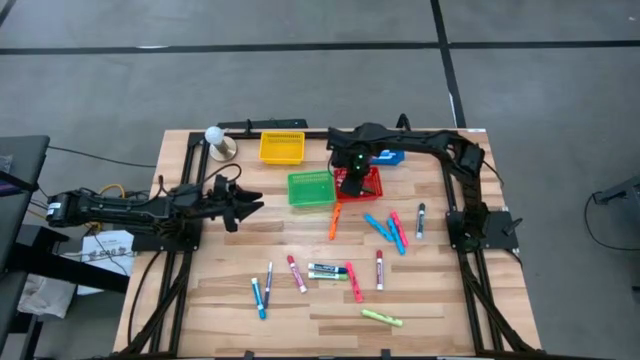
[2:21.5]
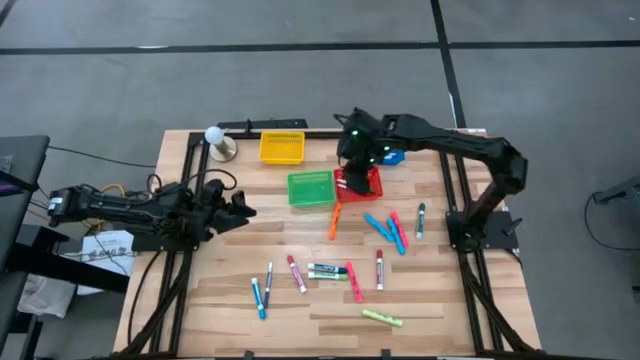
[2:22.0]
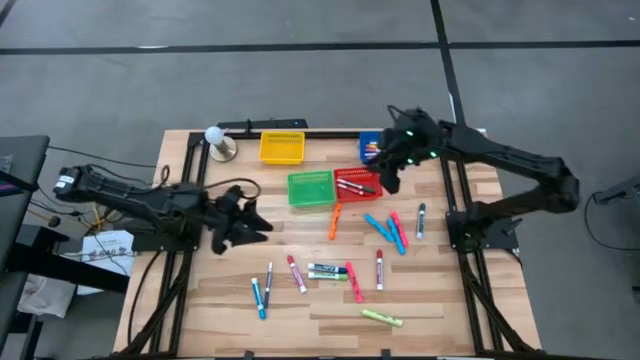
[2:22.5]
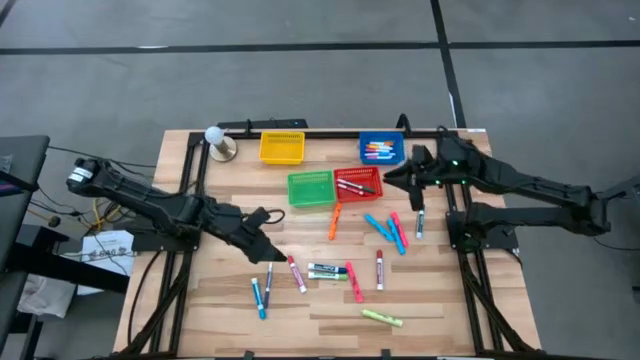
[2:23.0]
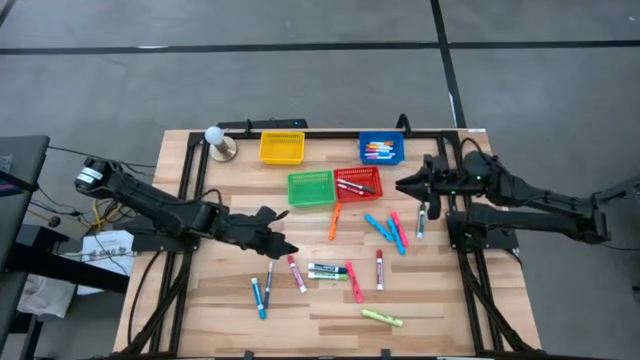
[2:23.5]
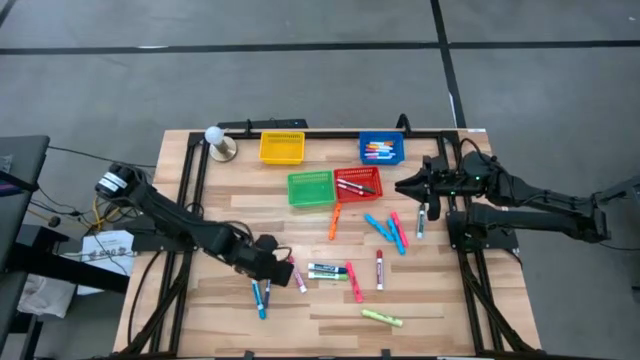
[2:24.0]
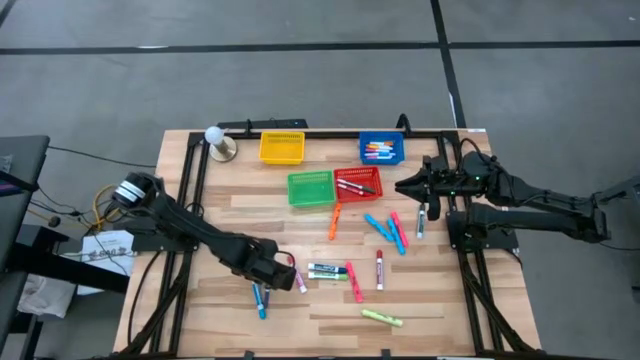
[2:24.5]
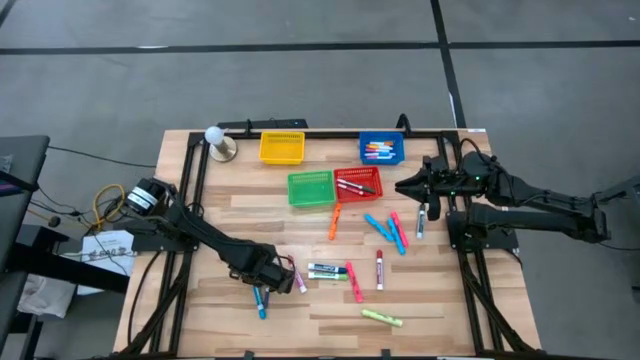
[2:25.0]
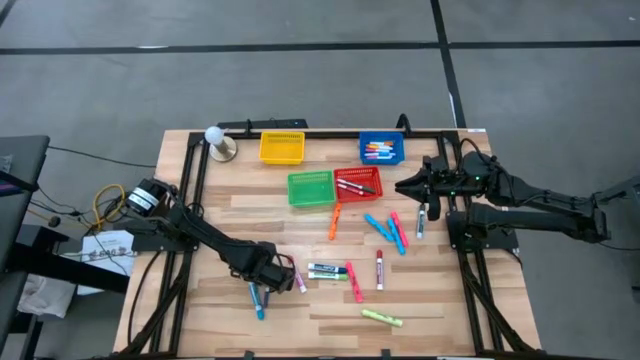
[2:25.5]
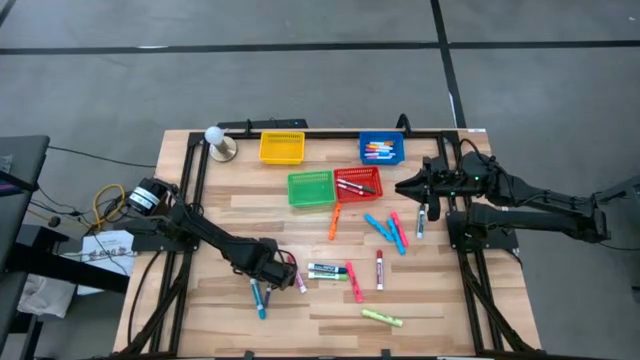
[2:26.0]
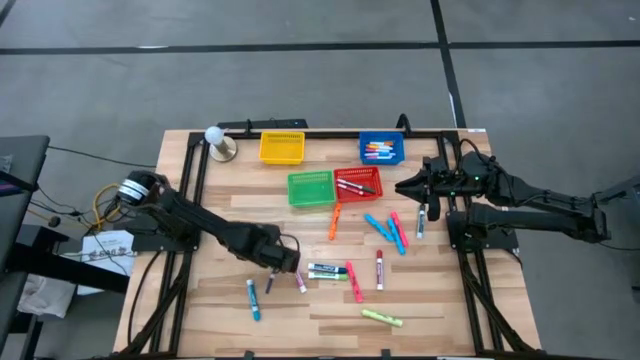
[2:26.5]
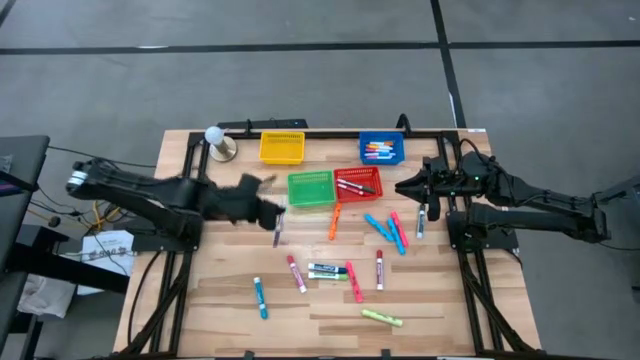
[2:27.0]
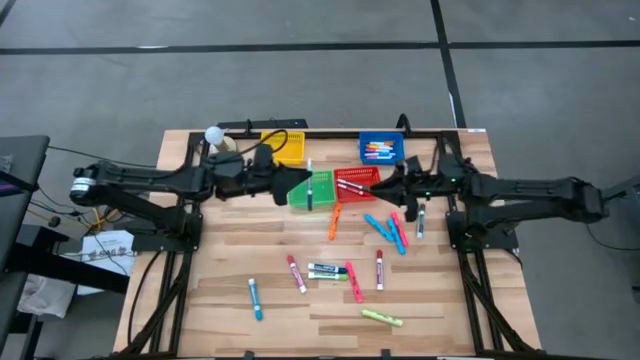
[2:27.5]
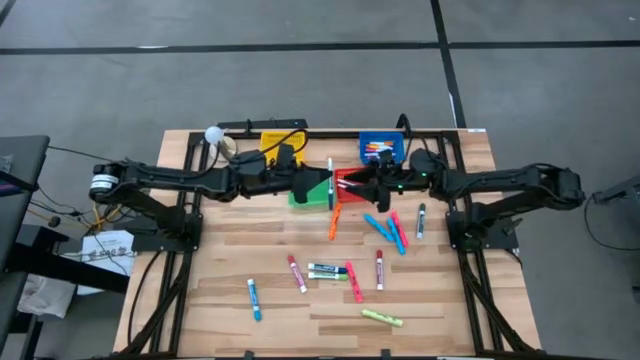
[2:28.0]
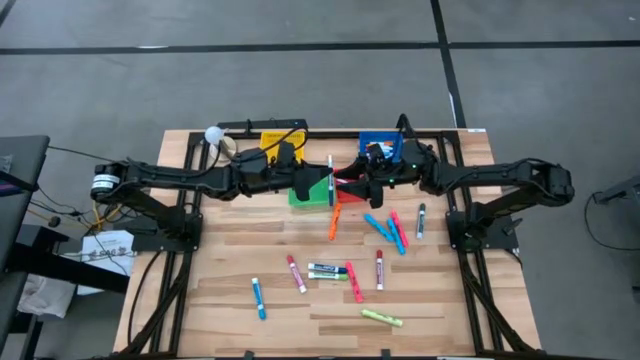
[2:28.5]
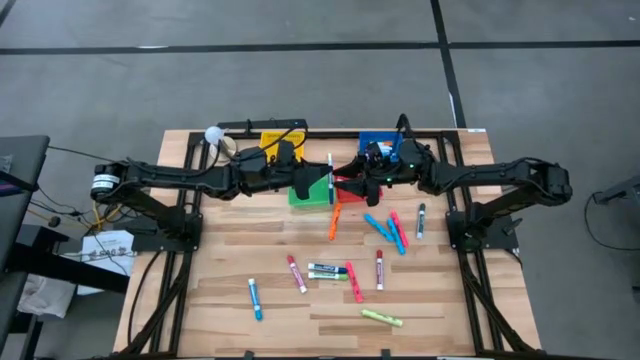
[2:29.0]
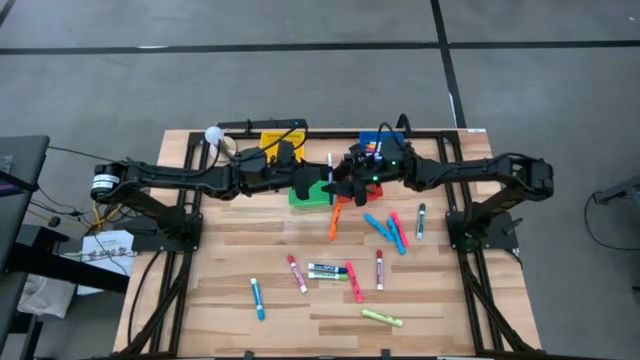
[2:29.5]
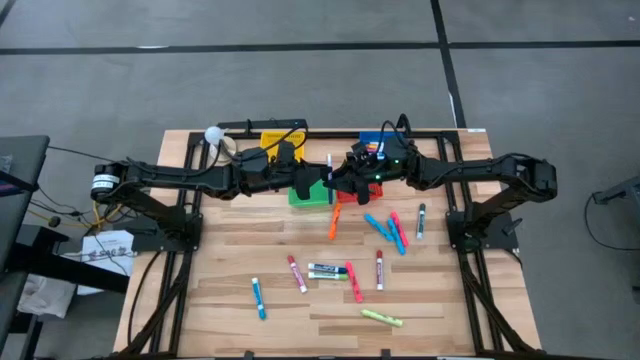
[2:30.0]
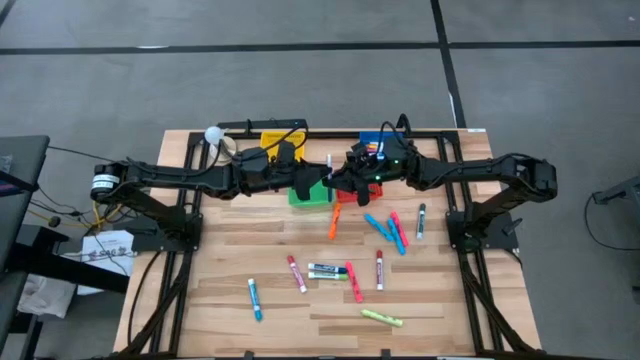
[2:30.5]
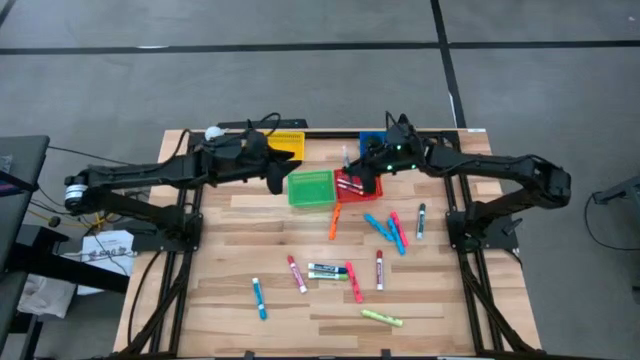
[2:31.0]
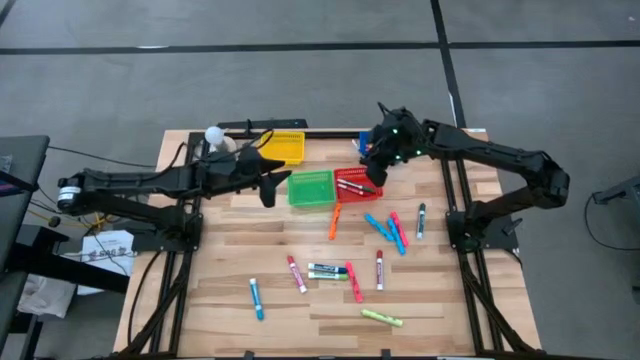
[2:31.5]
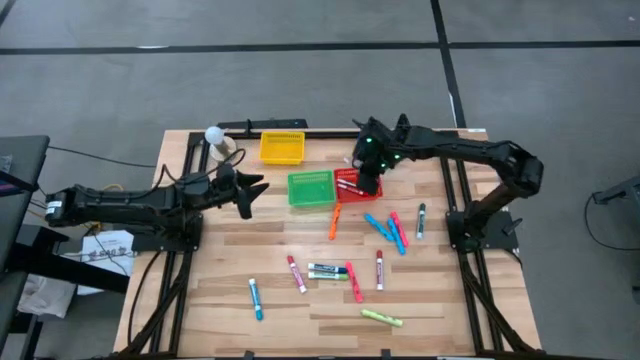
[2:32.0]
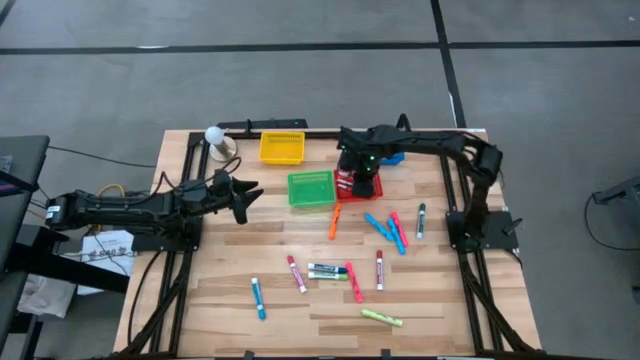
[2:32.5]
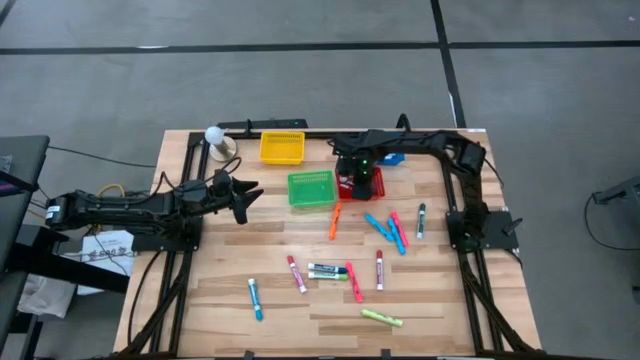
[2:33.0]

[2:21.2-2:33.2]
Task: Pick & Place Markers
Put the violet marker pen into the red bin

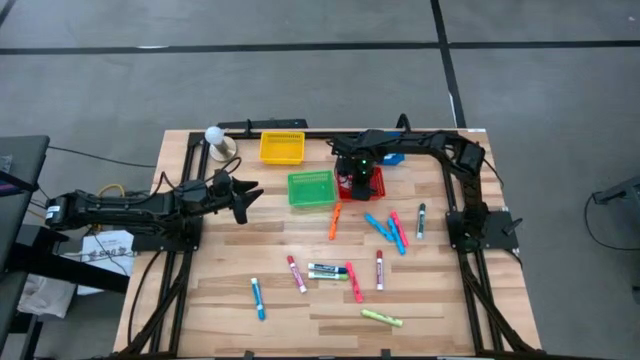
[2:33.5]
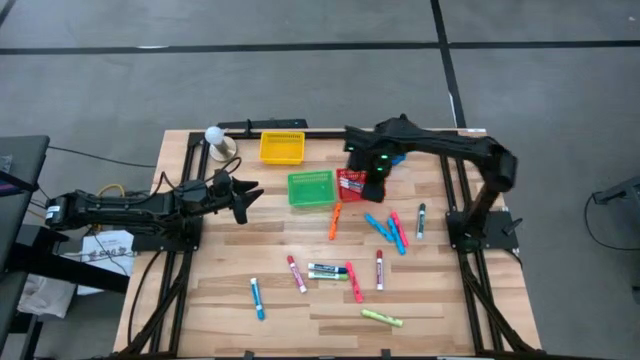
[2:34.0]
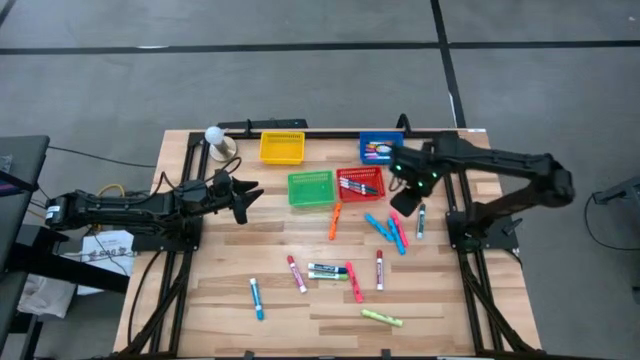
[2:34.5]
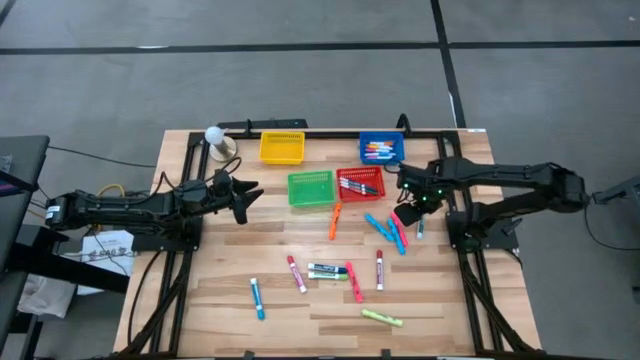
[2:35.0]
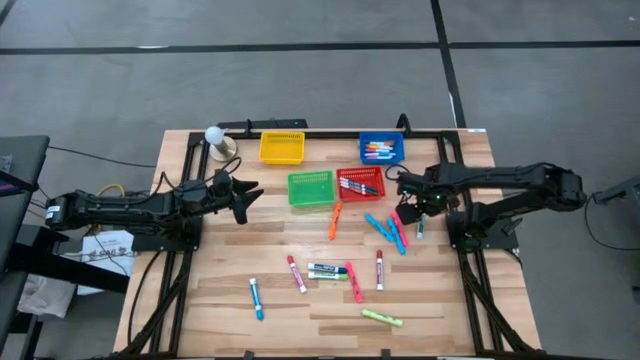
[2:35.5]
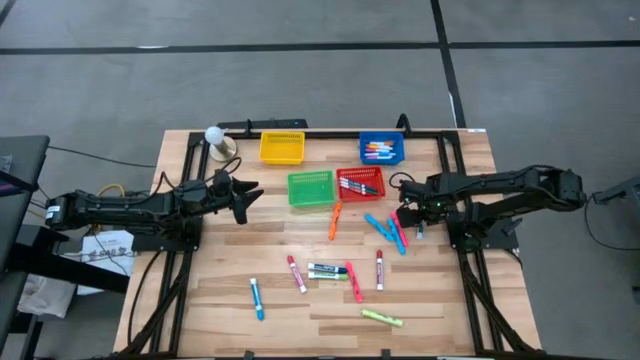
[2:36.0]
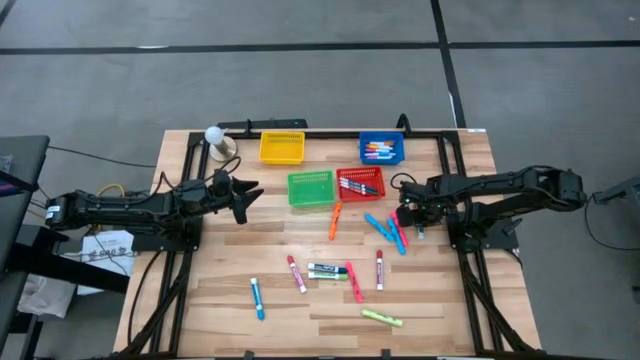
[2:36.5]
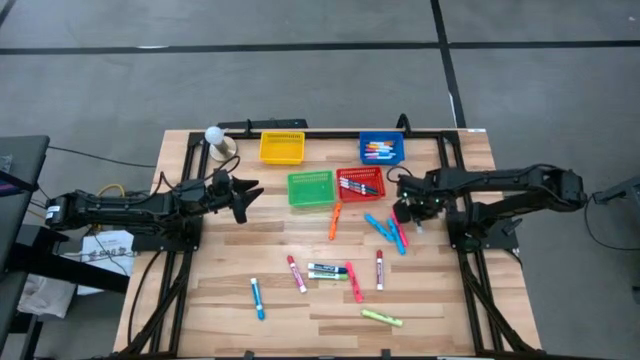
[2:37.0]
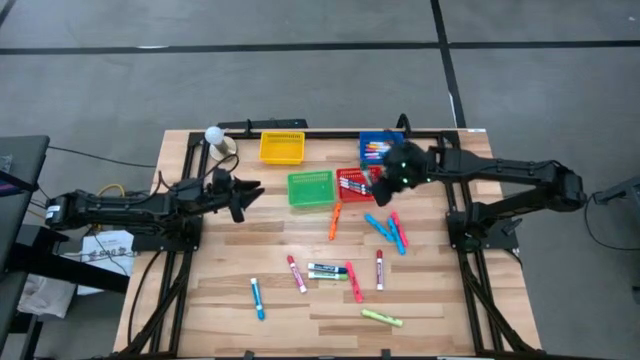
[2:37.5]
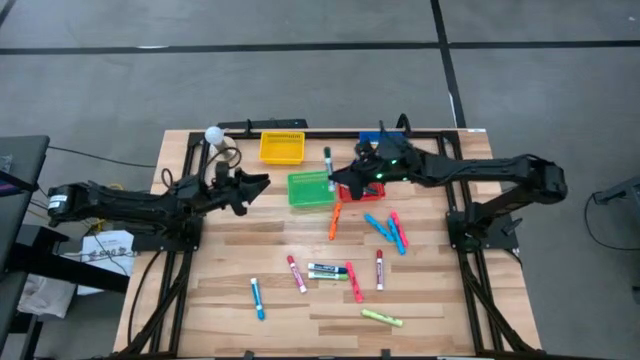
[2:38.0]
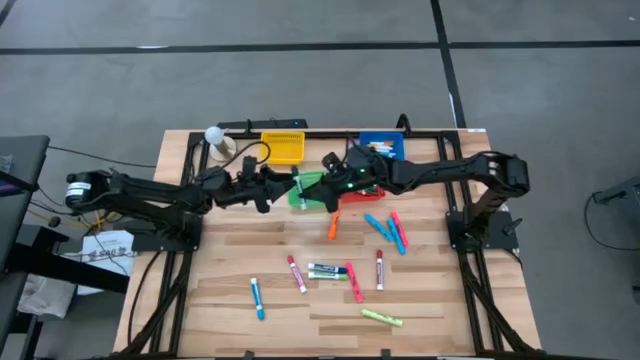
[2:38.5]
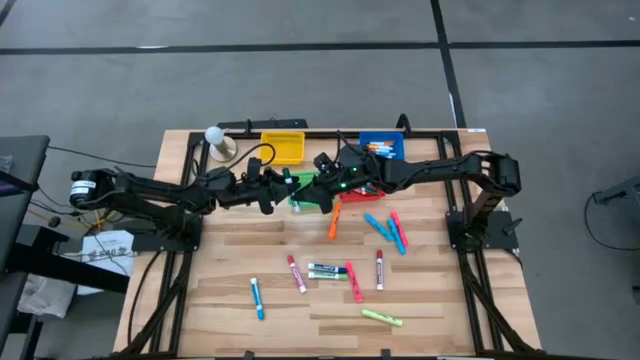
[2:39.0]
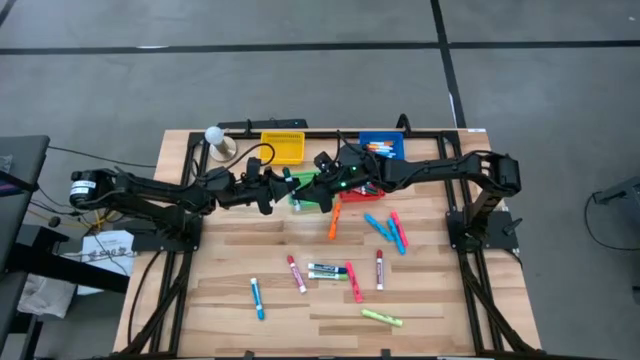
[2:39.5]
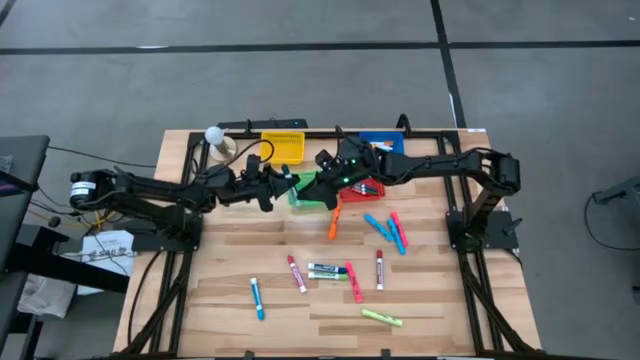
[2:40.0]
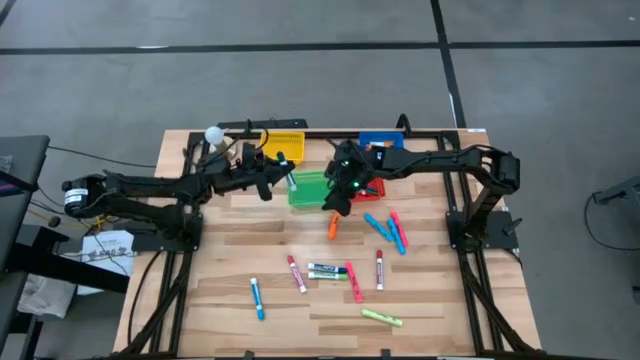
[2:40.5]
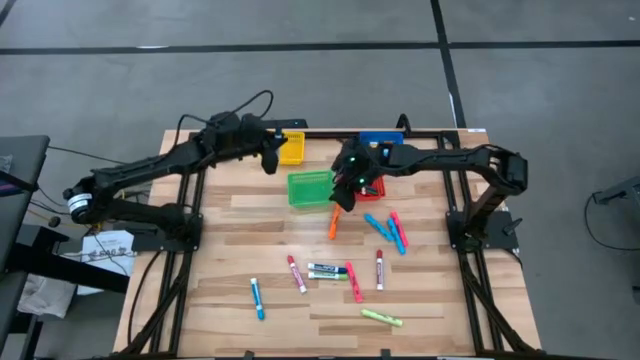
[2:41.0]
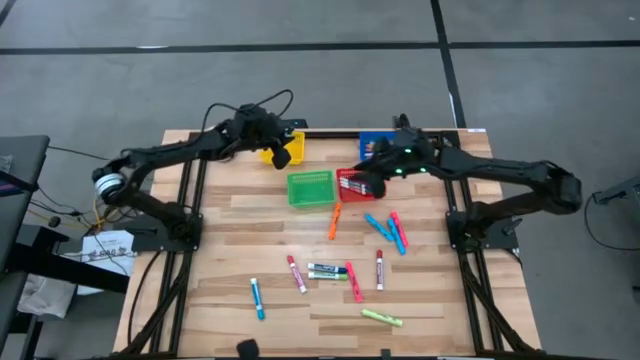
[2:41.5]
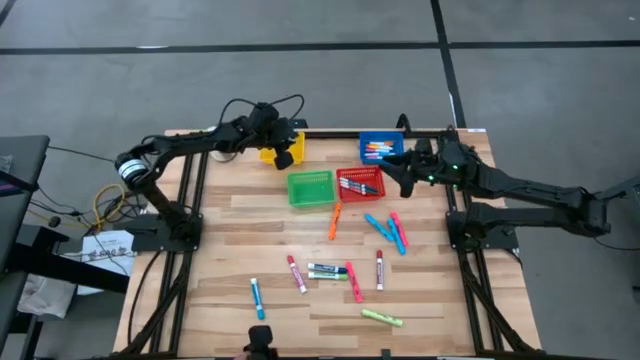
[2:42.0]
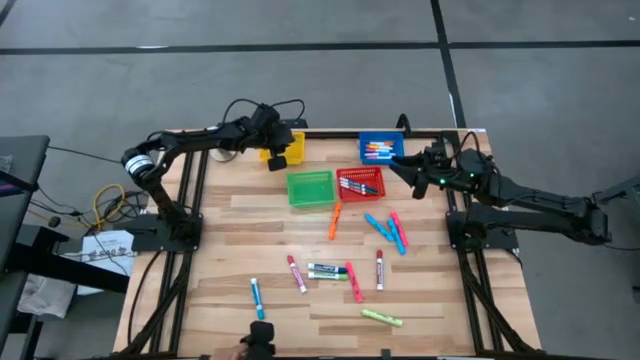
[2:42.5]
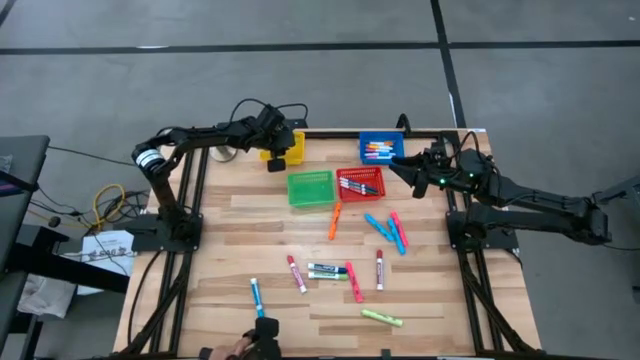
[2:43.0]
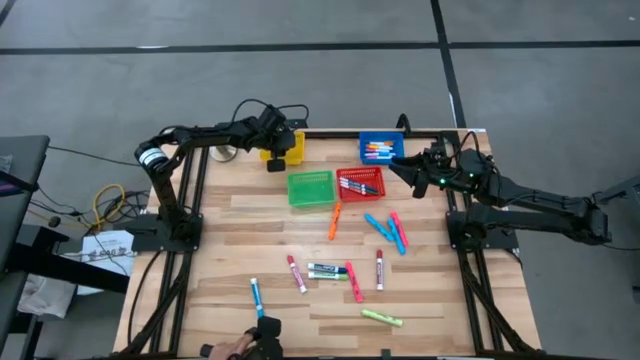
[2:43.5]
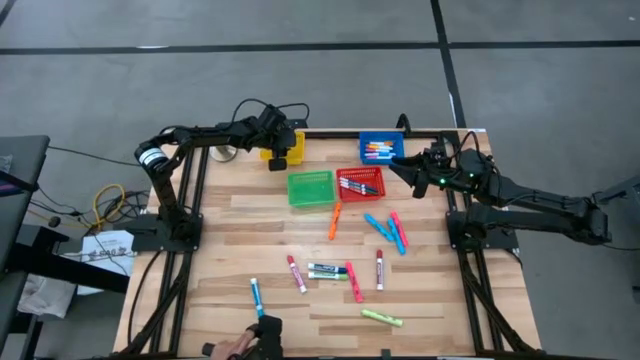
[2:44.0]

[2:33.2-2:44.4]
Put the large green marker pen into the yellow bin
